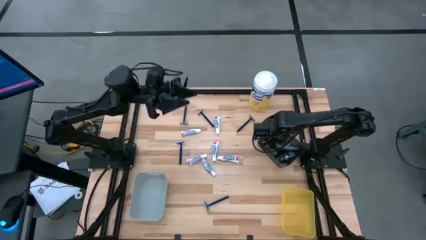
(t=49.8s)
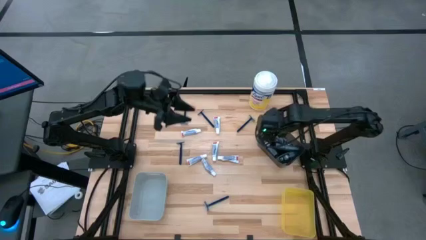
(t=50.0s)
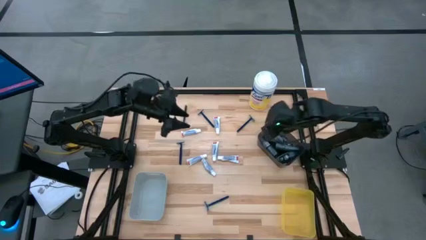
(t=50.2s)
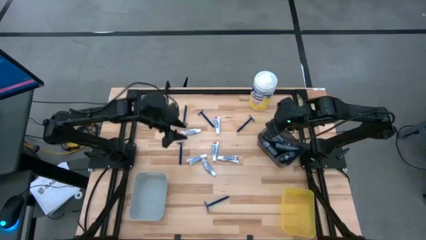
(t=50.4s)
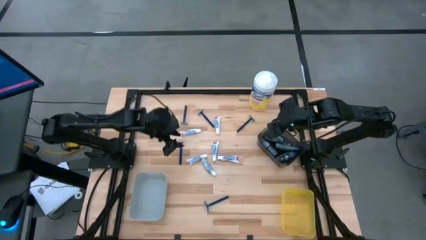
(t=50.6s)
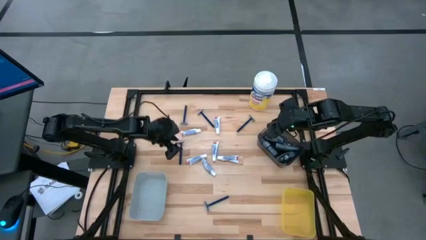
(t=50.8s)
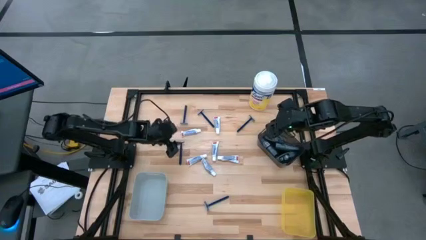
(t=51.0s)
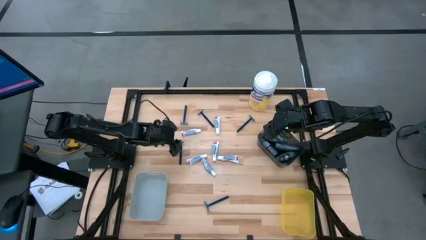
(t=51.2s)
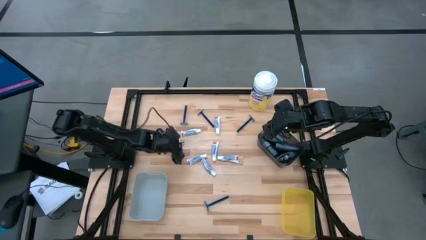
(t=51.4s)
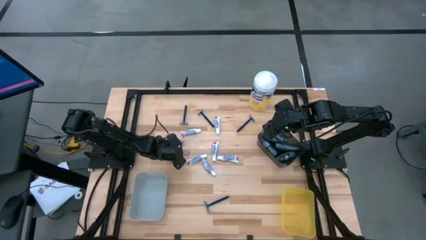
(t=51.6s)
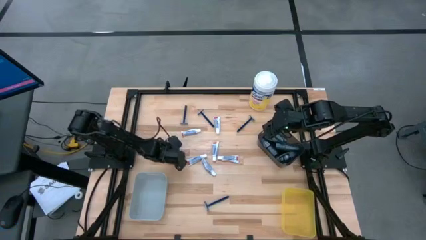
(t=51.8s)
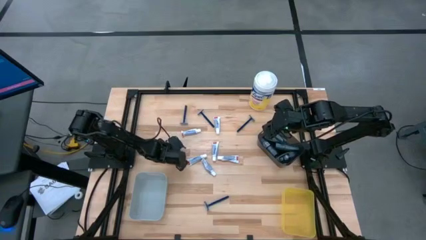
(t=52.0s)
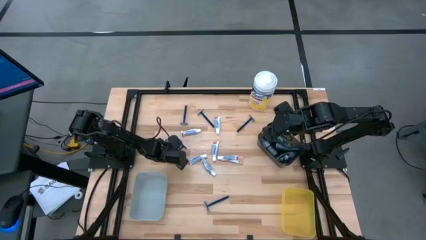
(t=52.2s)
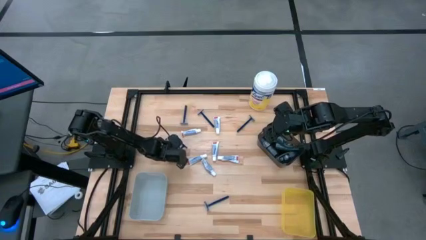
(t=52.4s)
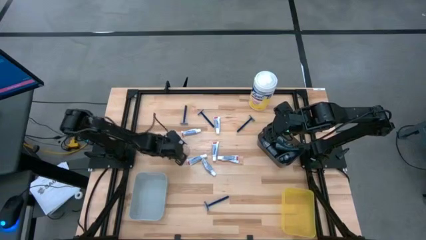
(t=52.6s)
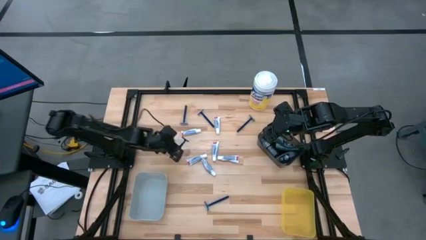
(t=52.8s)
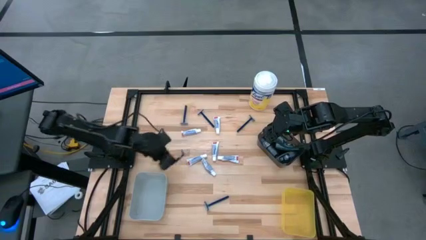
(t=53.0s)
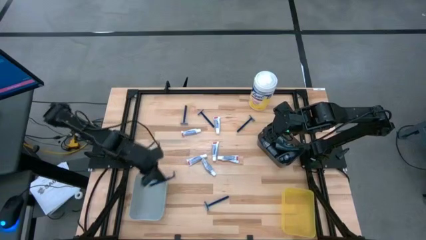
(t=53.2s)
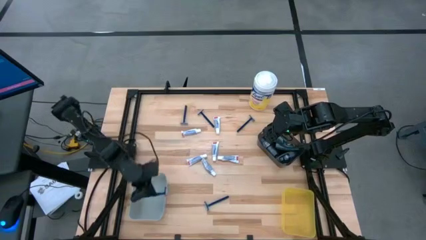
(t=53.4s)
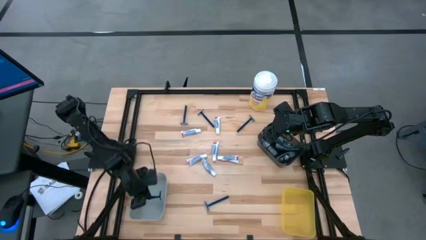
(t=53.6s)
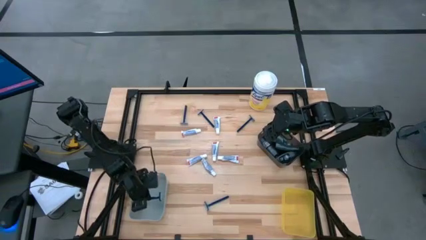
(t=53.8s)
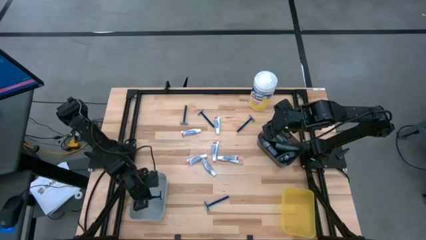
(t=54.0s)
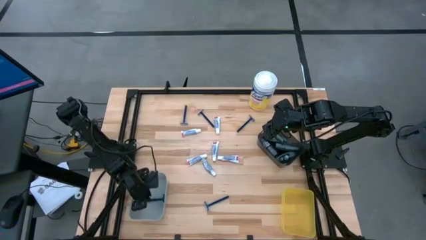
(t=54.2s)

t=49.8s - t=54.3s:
Task: Pick & Place Travel size toiletries
Put the blue razor into the gray bin

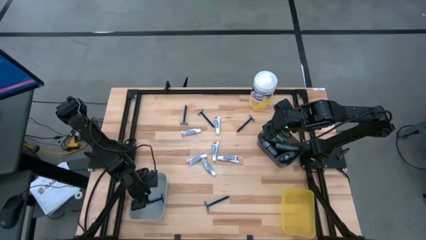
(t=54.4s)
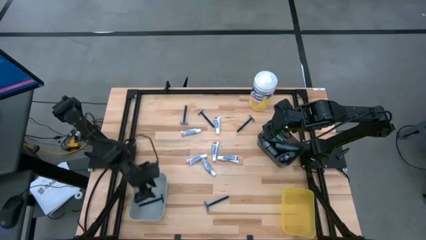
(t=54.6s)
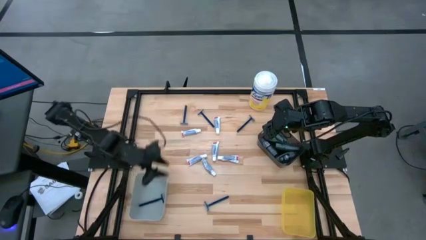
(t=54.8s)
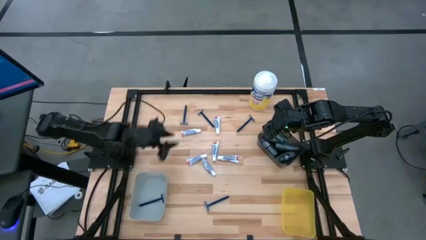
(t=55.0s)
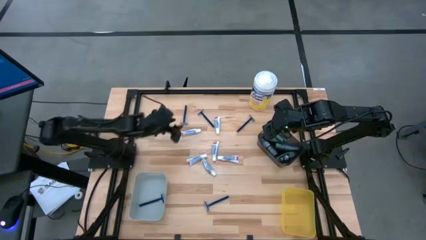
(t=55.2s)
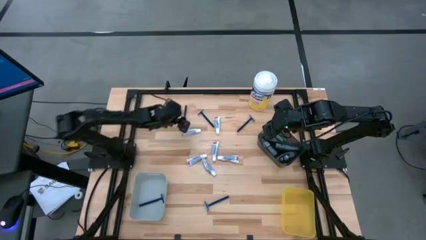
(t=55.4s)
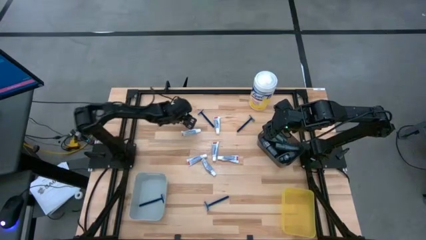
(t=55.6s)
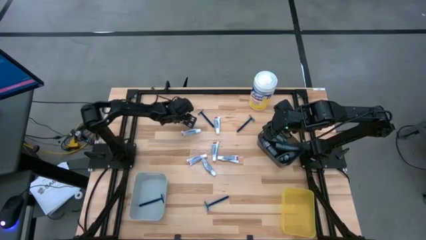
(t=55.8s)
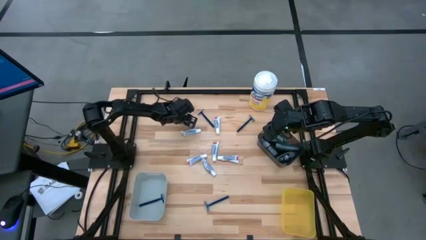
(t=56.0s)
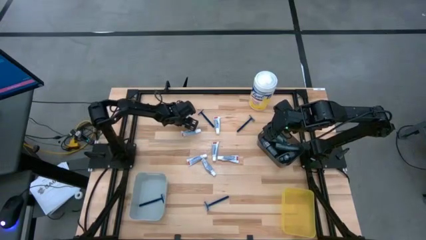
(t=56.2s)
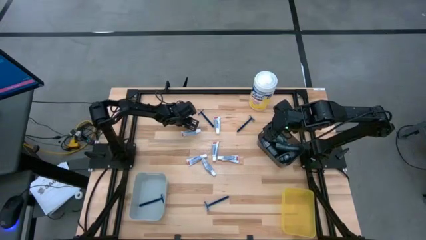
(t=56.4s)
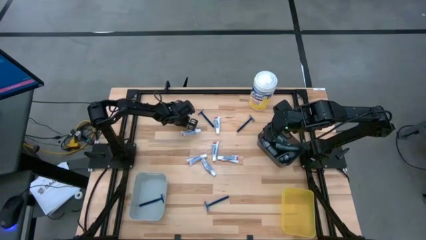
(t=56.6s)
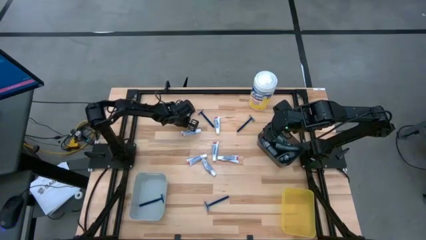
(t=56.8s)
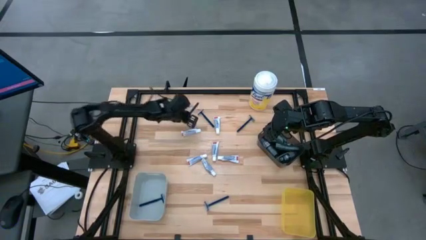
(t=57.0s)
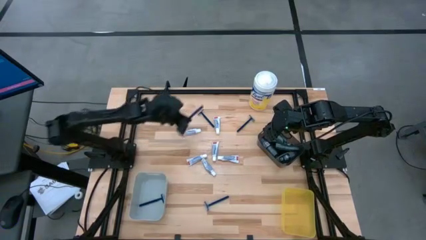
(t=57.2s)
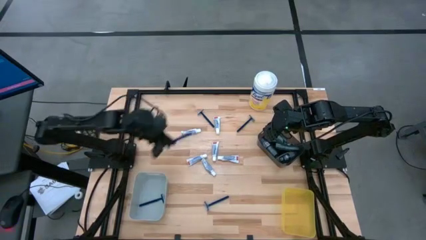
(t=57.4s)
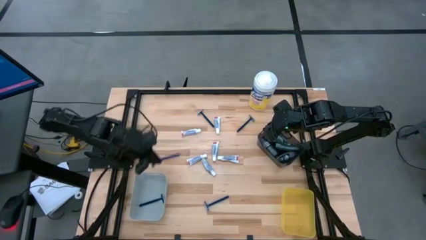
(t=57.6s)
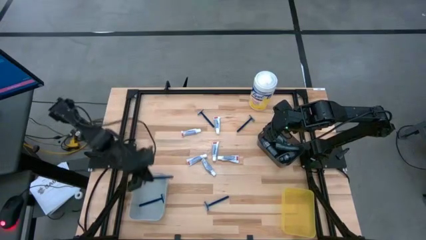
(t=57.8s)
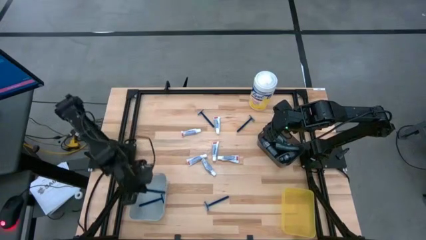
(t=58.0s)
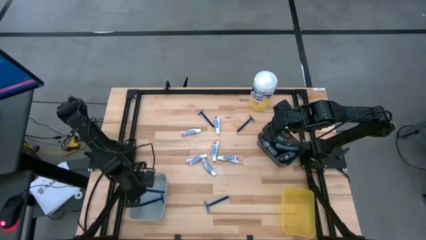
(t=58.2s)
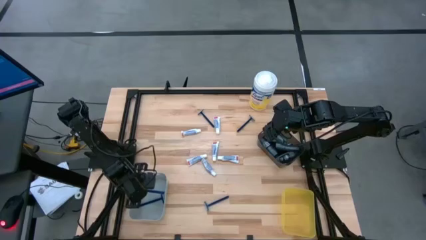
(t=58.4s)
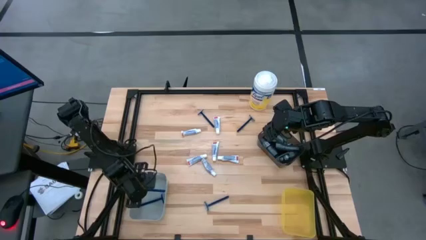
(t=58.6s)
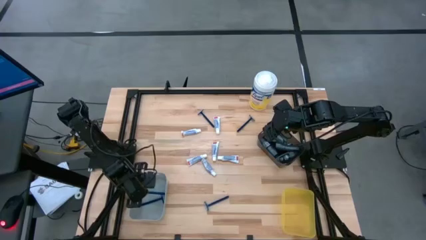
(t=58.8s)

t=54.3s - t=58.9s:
Put the blue razor into the gray bin

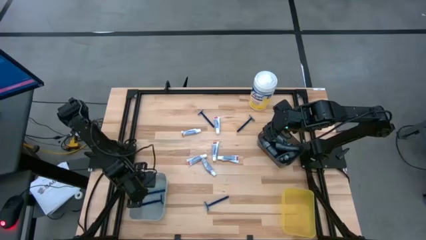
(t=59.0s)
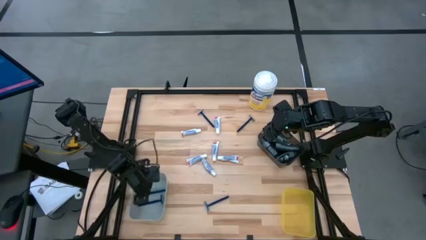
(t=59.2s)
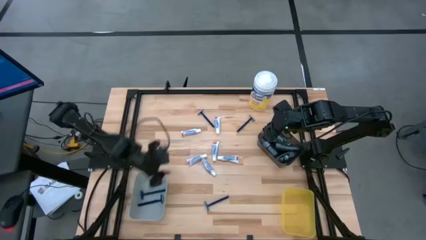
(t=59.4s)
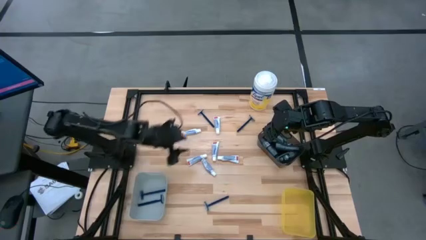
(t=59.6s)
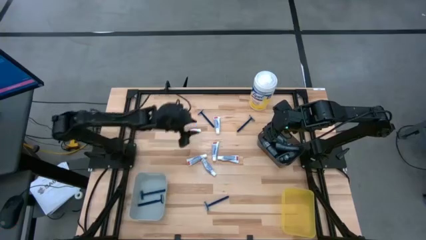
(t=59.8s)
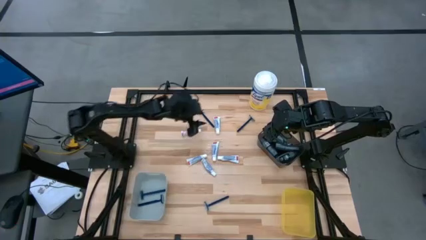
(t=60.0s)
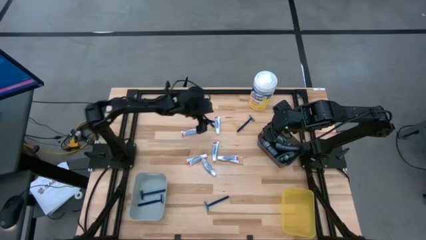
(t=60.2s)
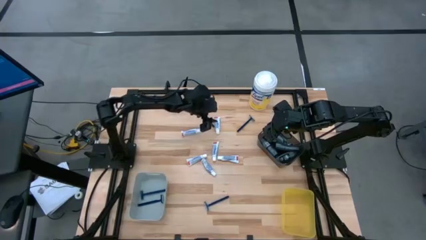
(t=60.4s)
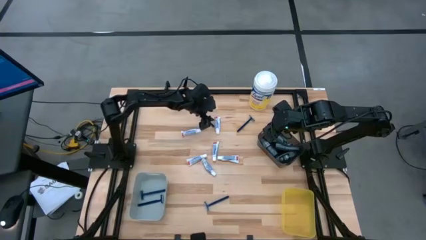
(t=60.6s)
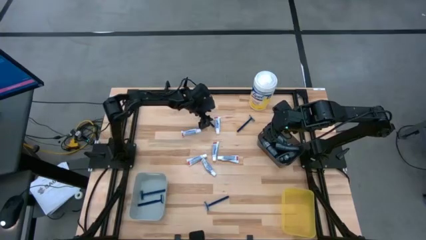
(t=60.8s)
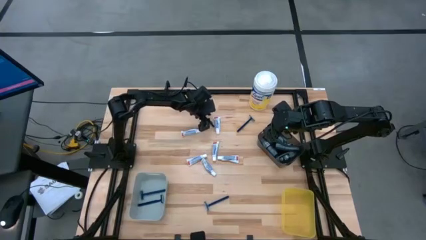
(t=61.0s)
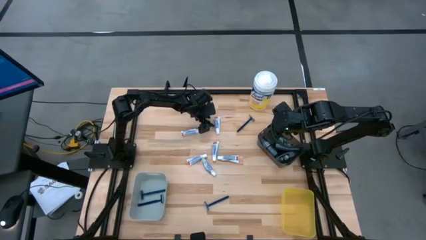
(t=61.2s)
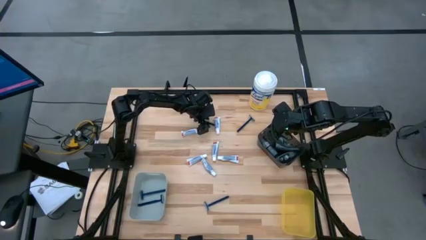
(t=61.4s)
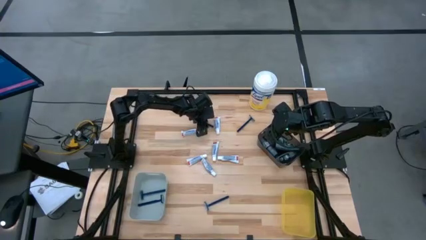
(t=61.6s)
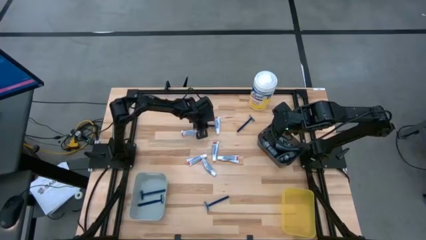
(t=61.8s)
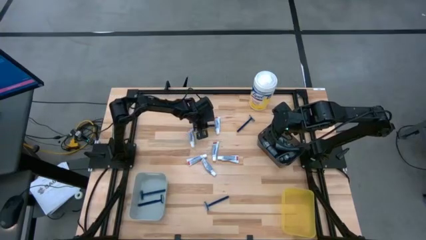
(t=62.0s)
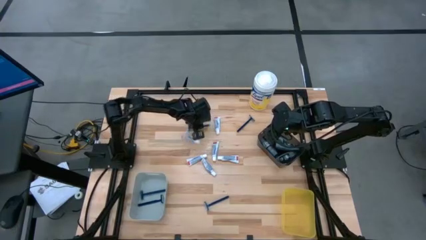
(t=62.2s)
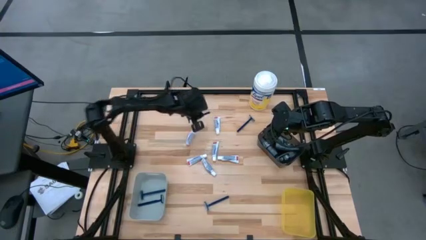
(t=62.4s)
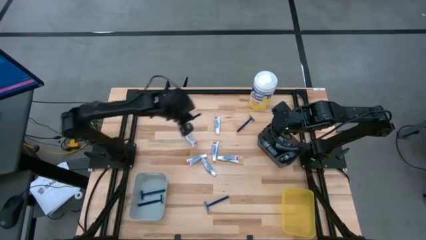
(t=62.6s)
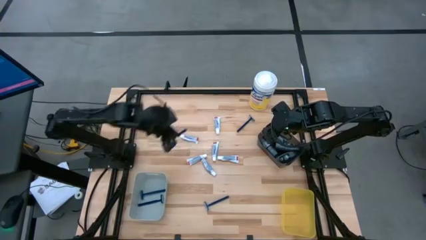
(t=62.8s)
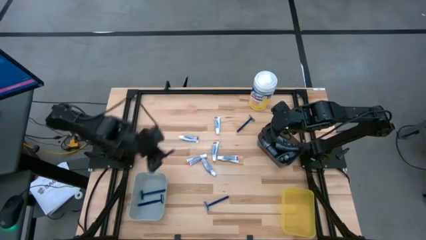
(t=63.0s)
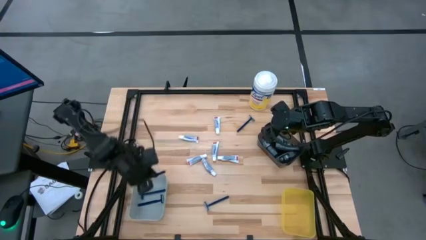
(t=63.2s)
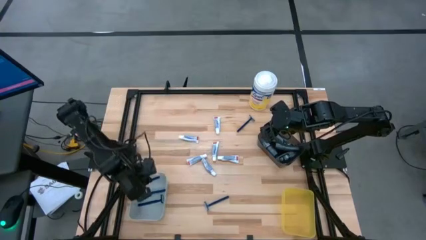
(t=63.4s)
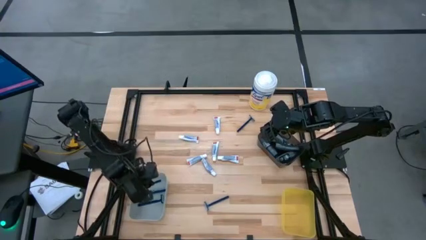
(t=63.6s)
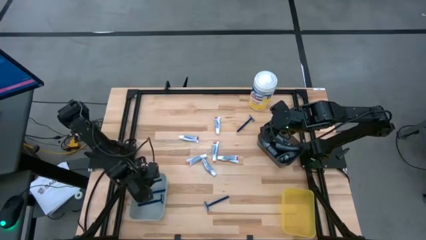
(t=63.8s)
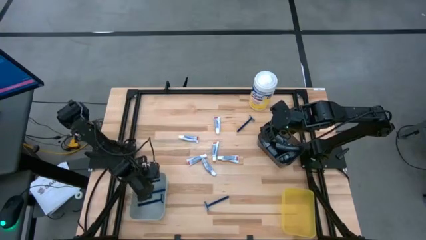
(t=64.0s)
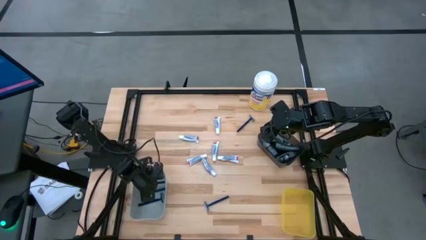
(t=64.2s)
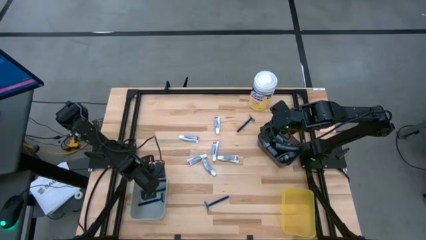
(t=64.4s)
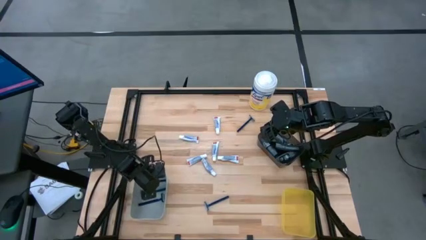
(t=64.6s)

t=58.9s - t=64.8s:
Put the blue razor into the gray bin

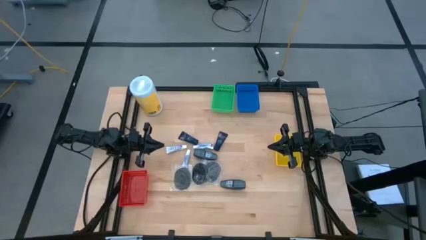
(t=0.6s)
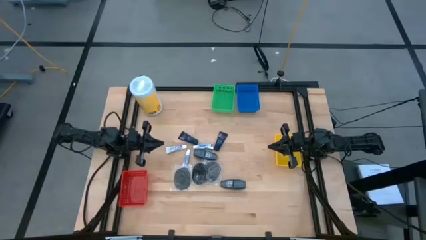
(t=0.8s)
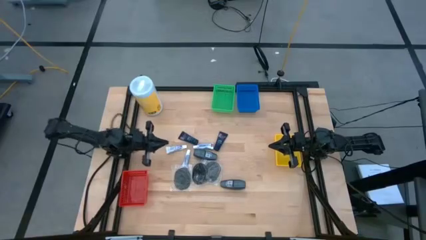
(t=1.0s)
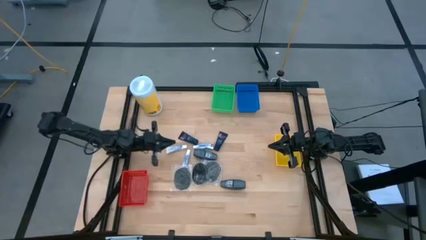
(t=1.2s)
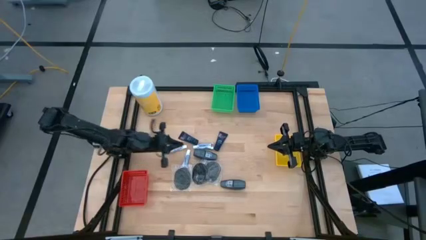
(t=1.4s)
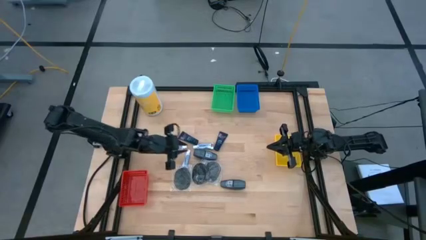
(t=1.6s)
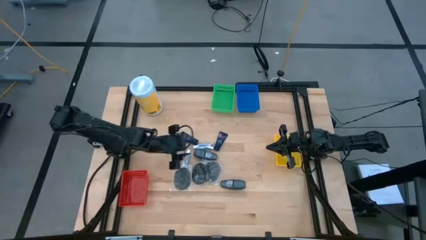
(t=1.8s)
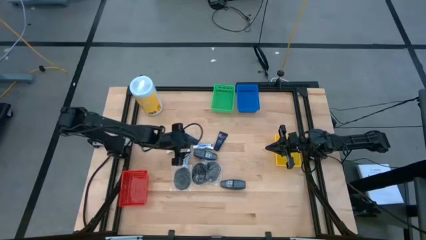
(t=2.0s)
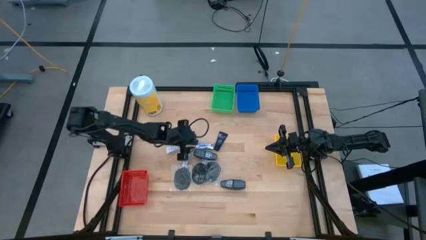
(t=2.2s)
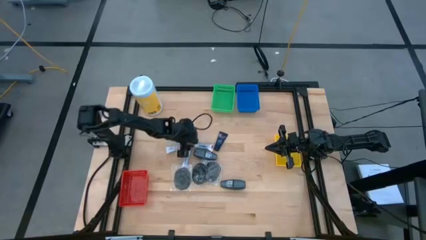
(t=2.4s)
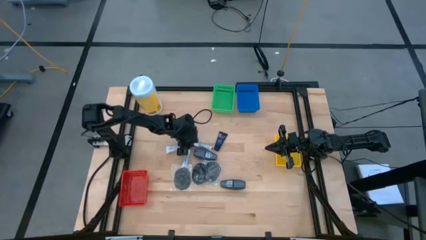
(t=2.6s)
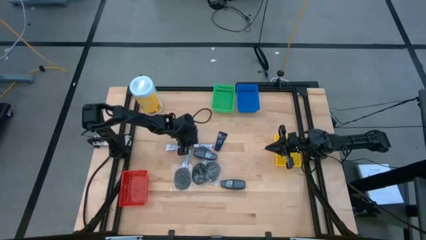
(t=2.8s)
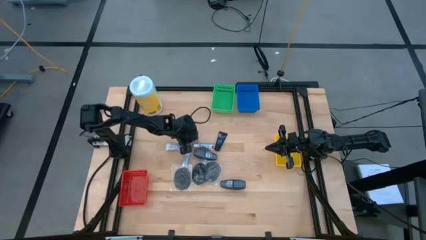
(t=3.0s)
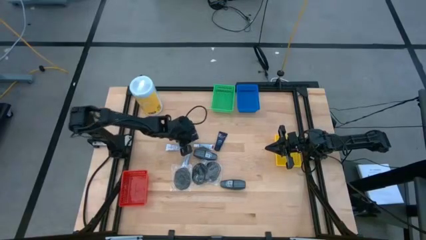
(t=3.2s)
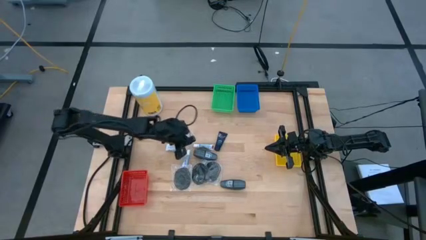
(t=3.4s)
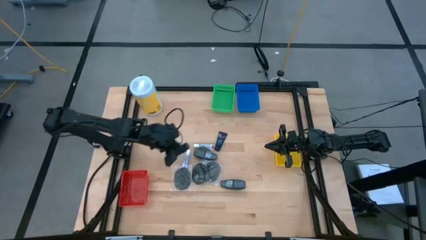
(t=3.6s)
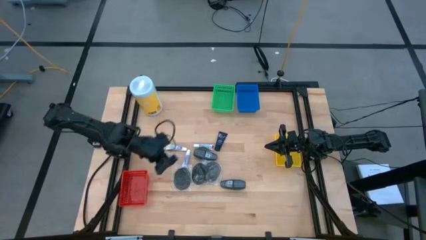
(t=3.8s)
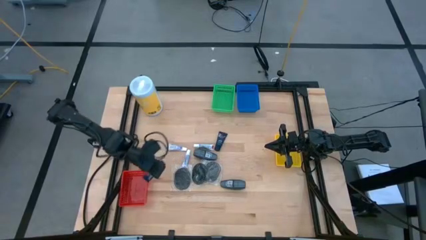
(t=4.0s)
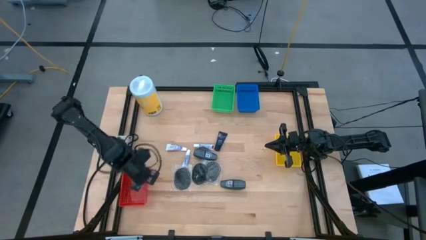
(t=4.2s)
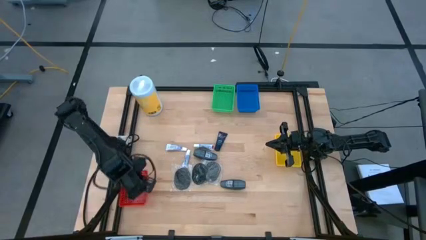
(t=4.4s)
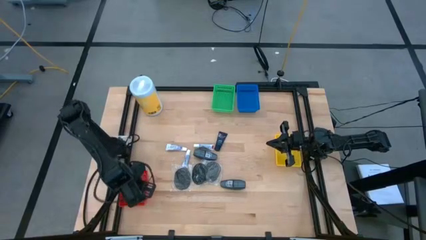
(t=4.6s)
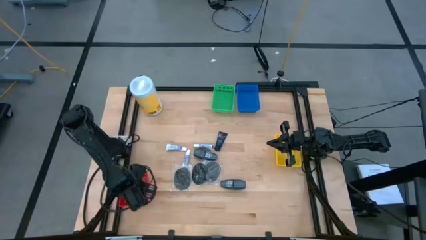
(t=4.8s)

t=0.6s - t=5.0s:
Task: Pick & Place Travel size toiletries
Put the blue shave cream into the red basket
